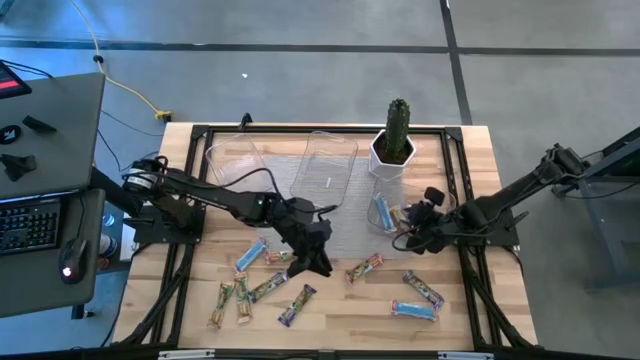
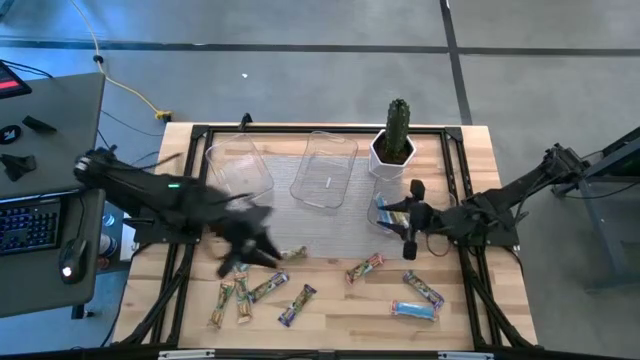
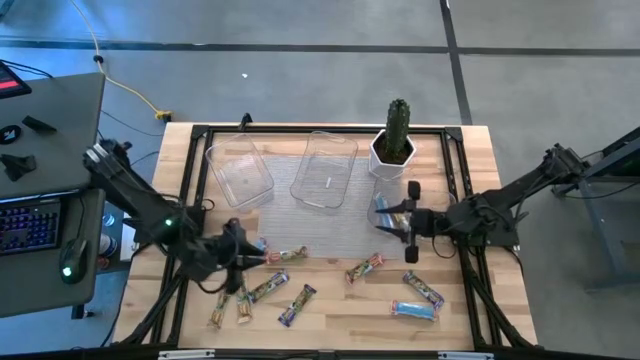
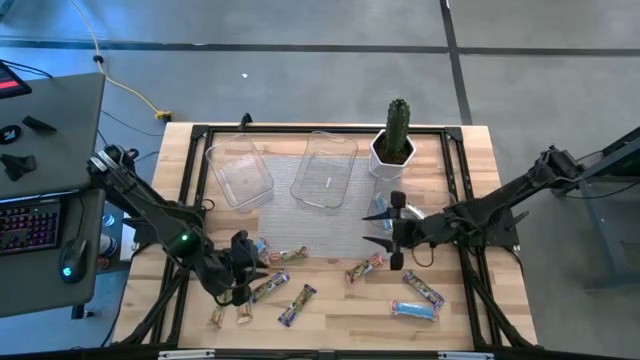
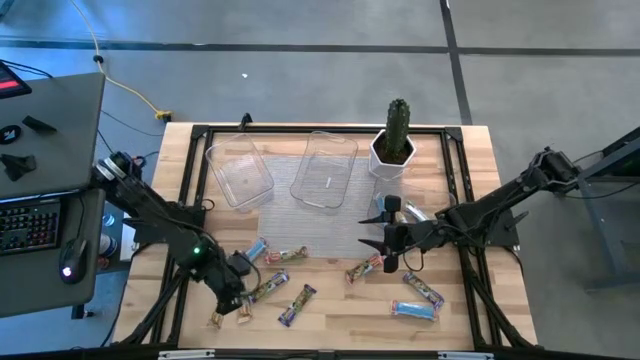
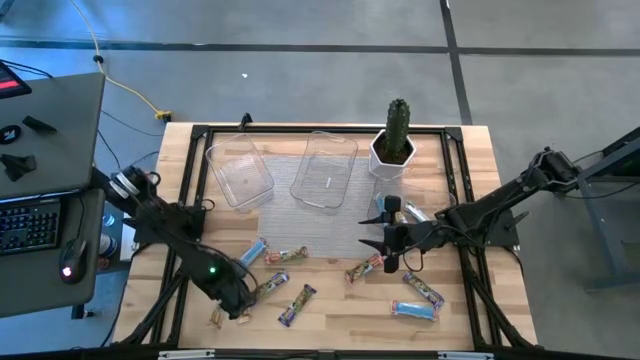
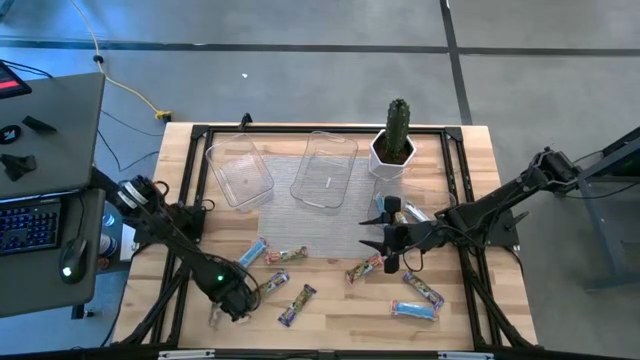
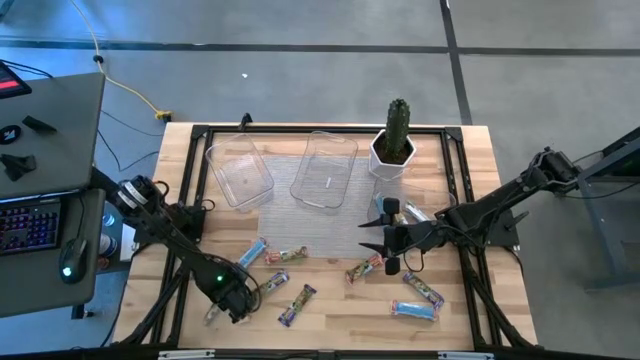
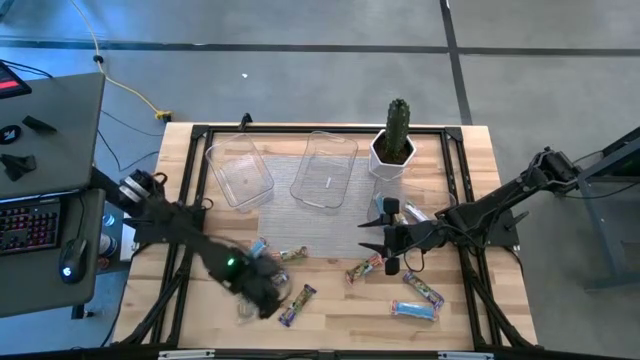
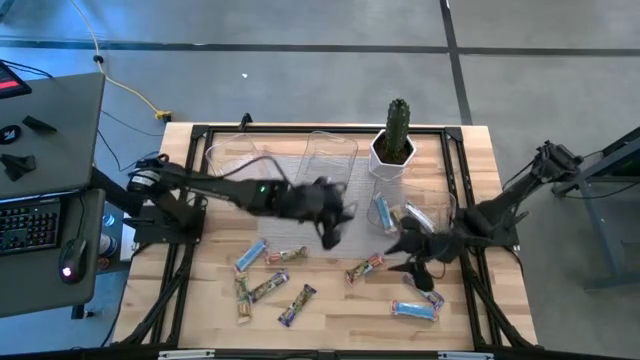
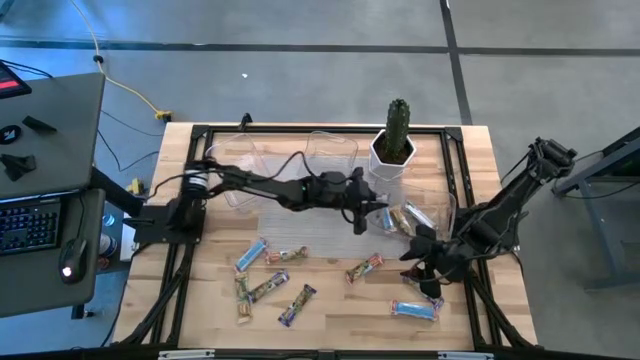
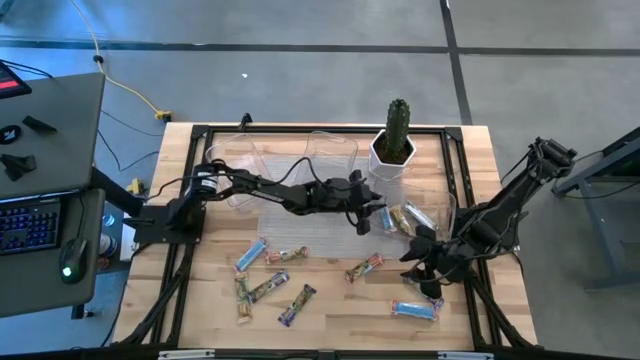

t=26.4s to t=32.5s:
Task: Pick and place Granola Bars by type
Put the yellow granola bar into the right transparent bin

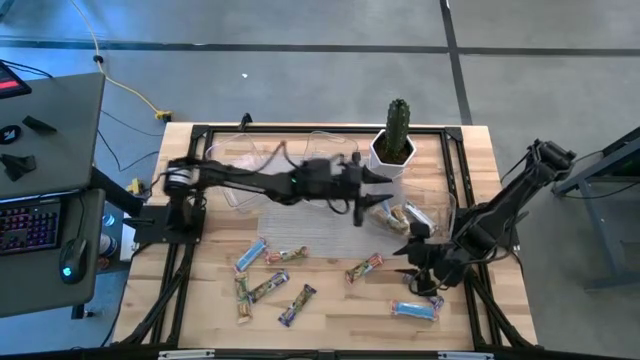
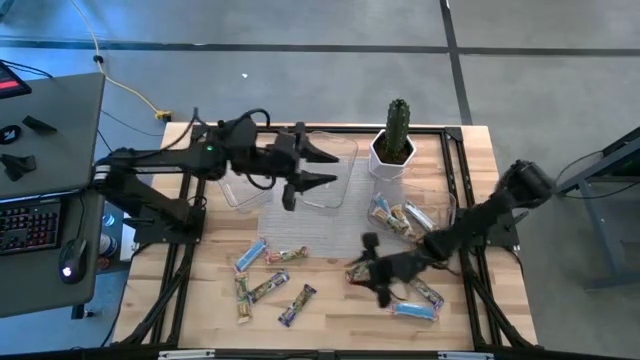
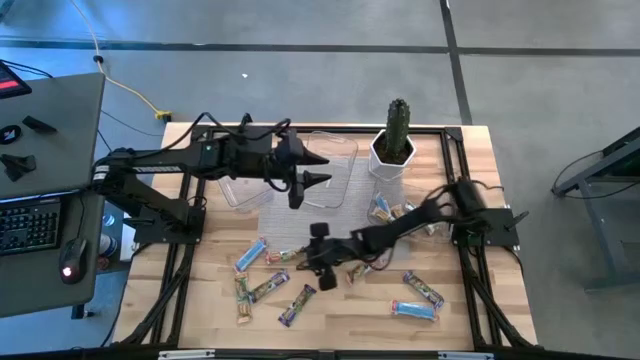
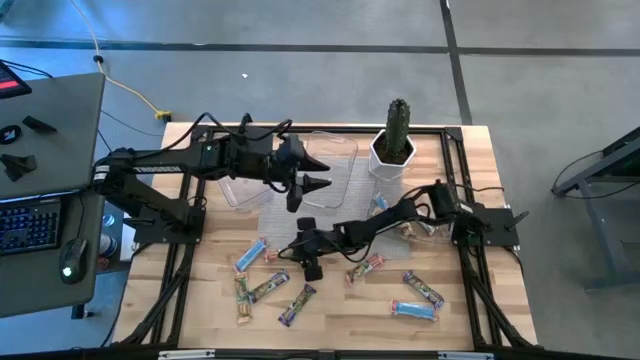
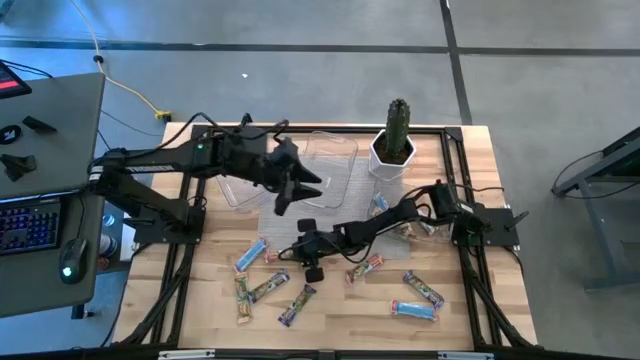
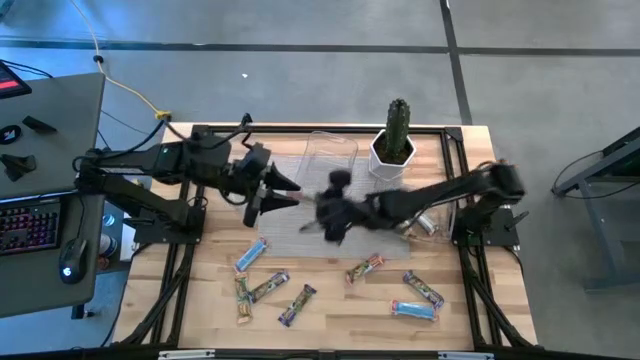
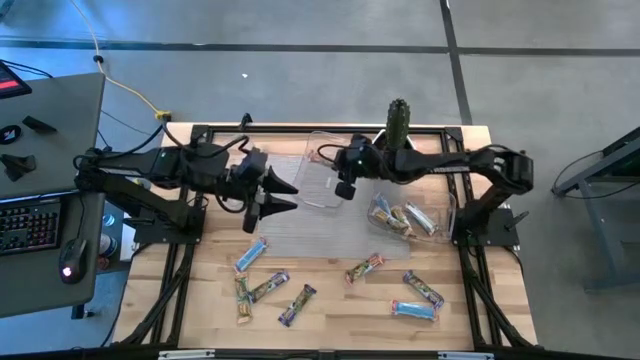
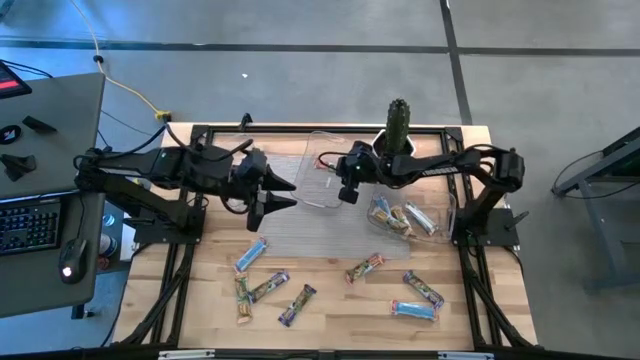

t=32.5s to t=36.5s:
Put the red granola bar into the middle transparent bin

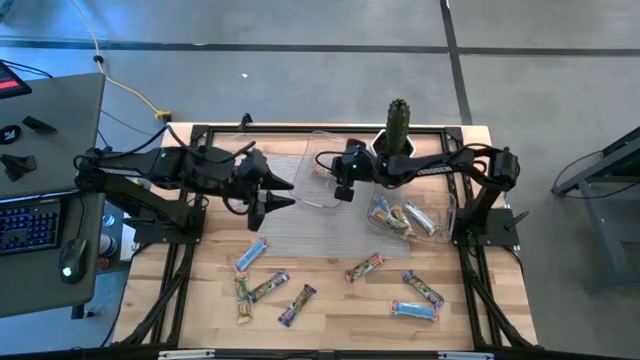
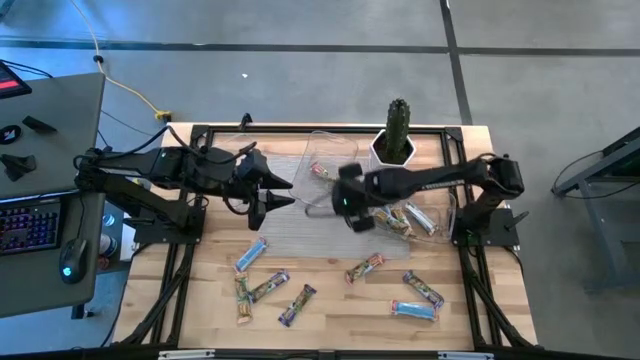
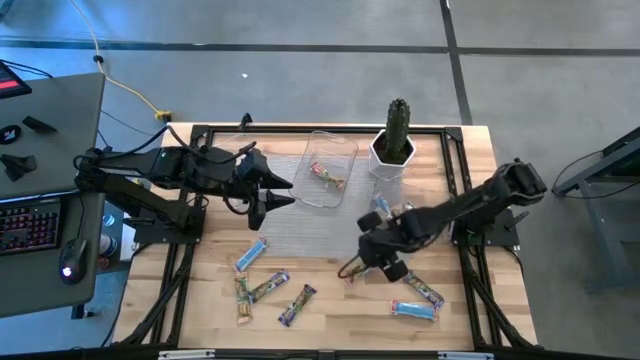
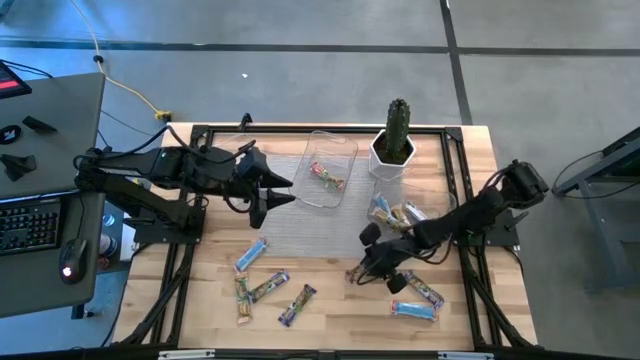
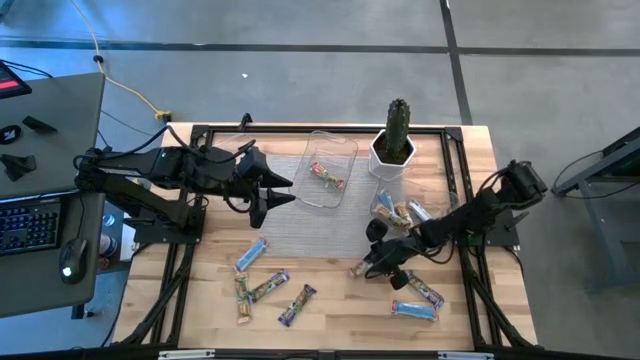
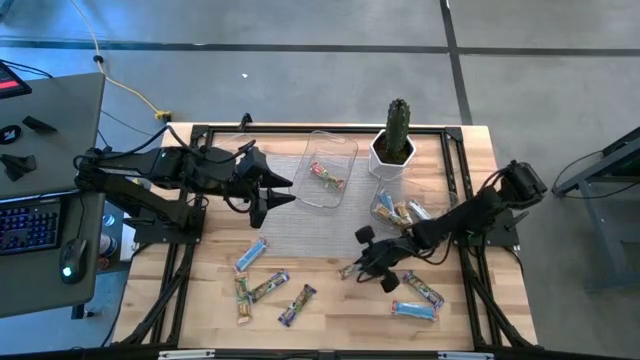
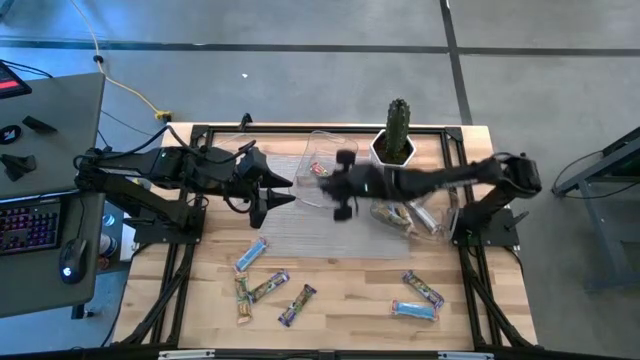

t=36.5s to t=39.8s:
Put the red granola bar into the middle transparent bin

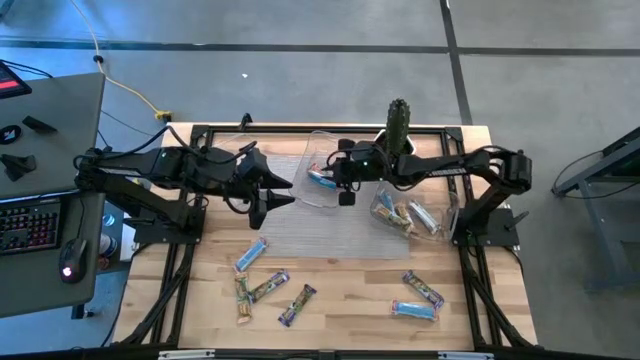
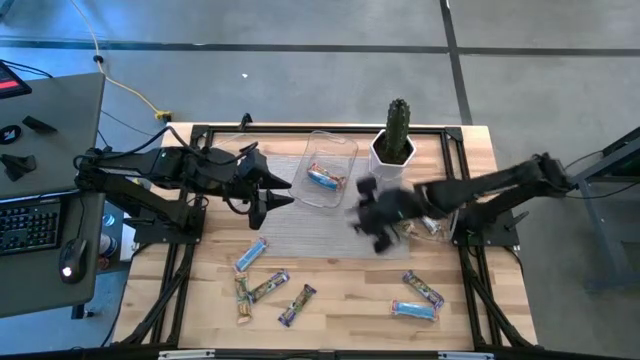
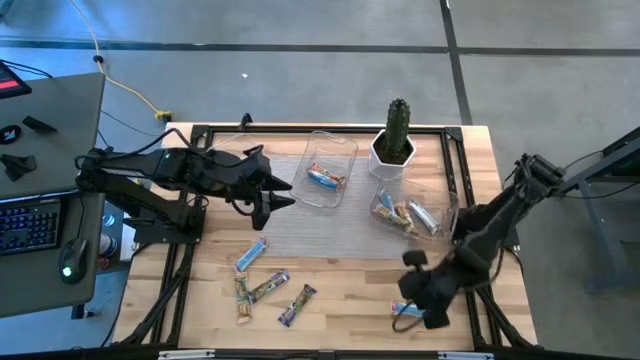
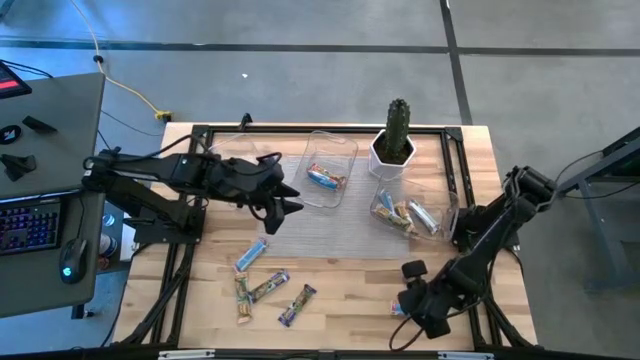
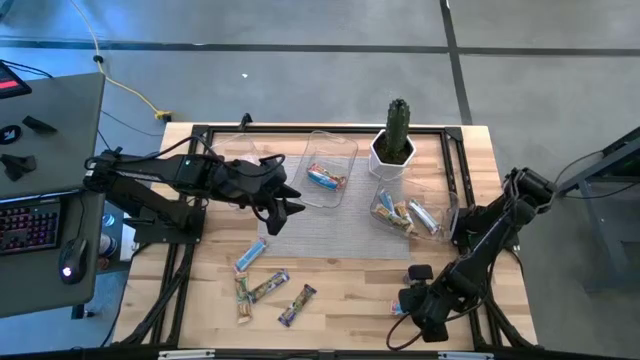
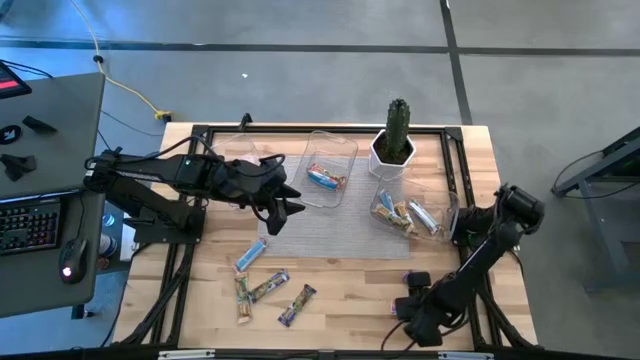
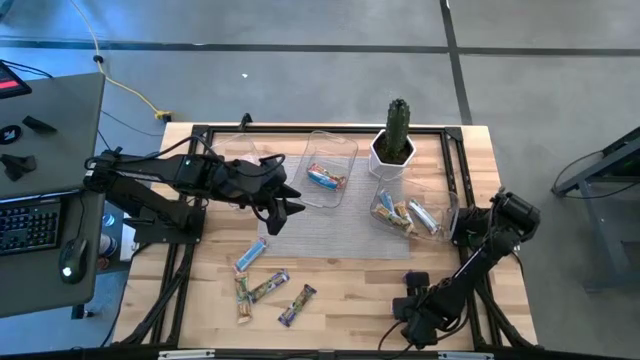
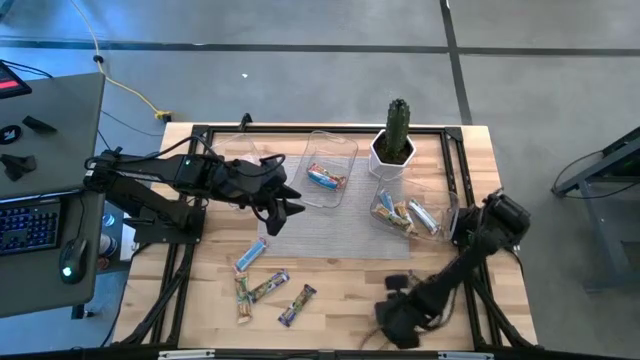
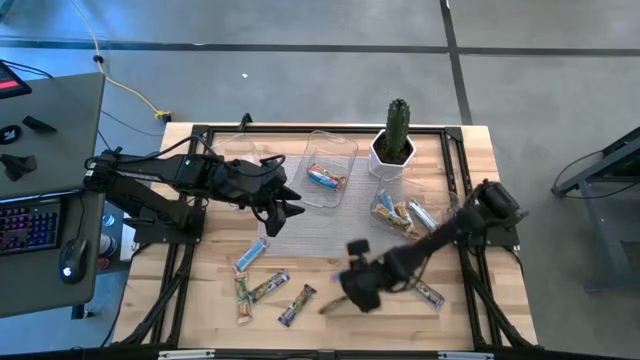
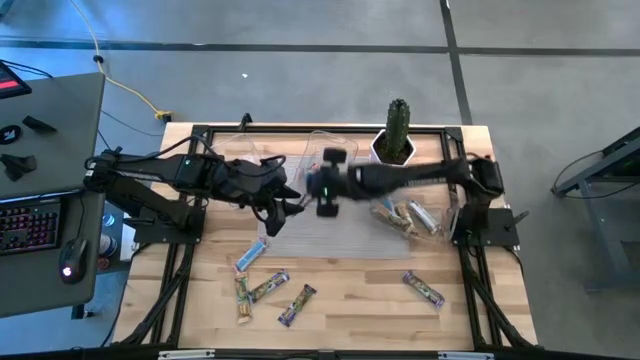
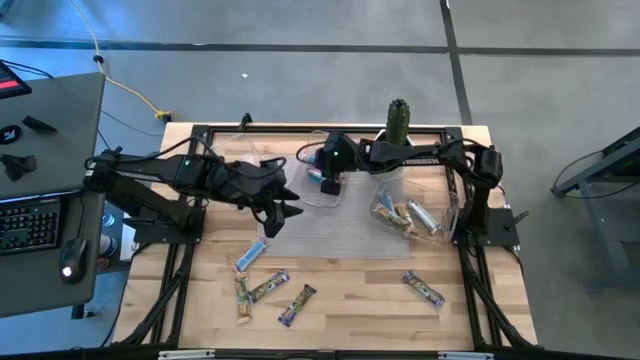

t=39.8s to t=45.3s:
Put the red granola bar into the middle transparent bin

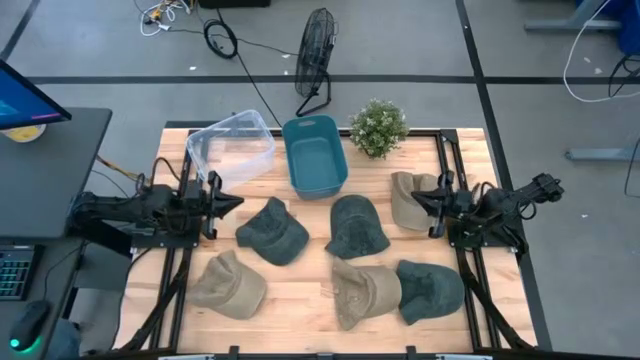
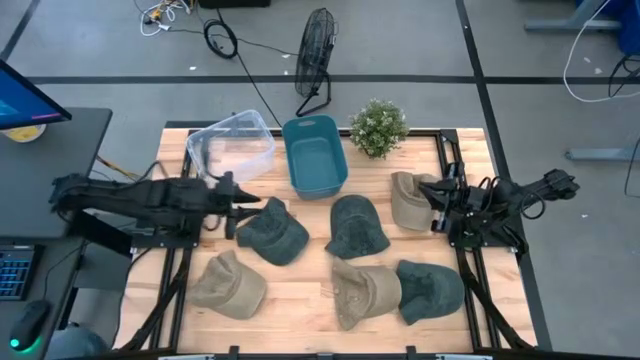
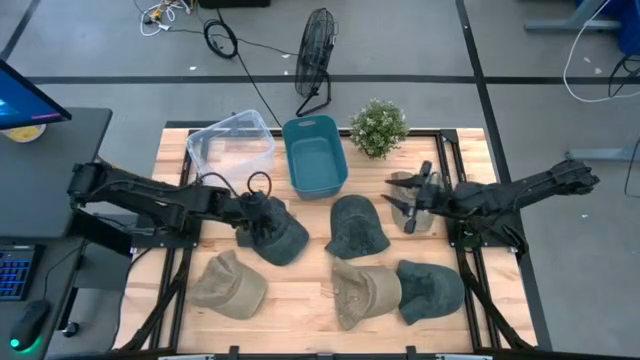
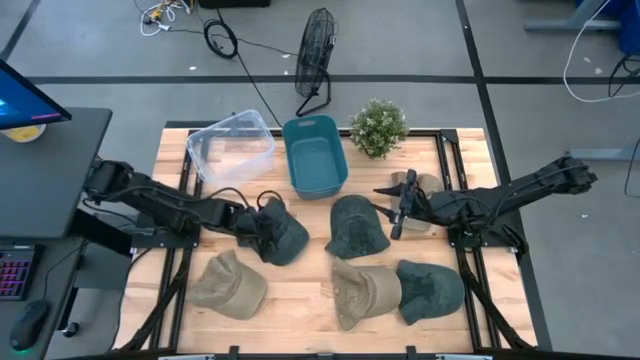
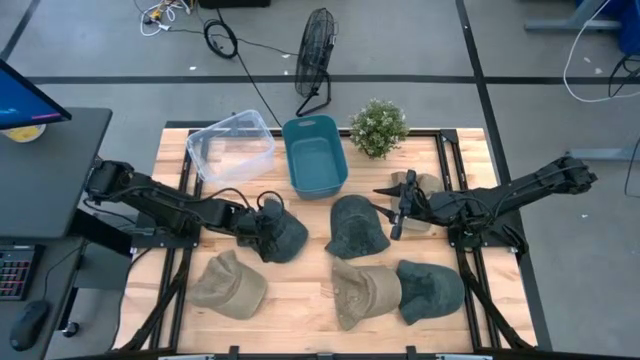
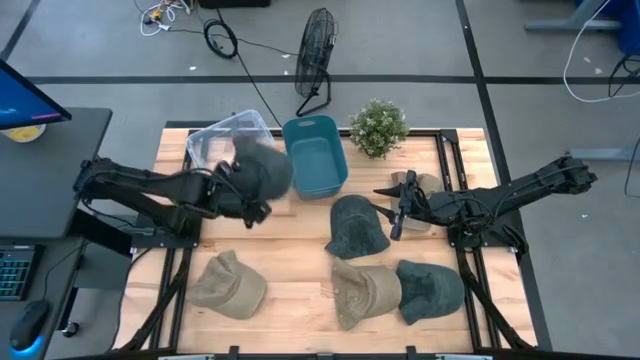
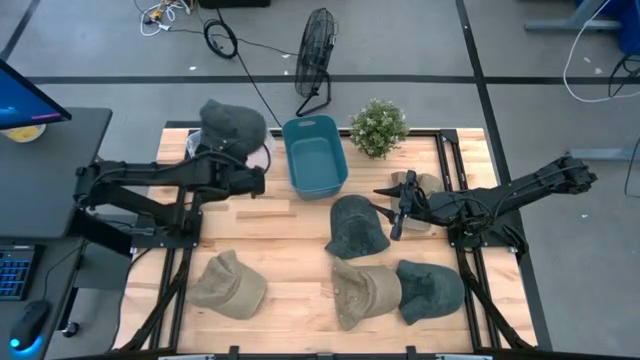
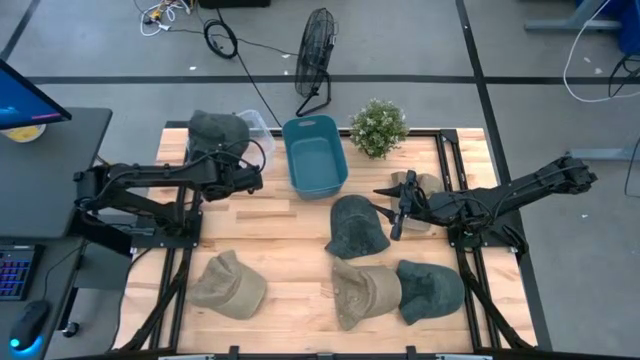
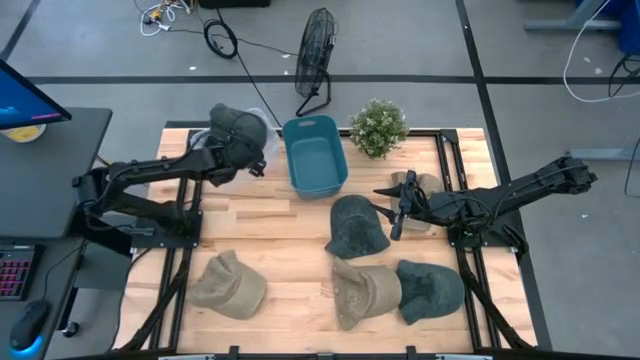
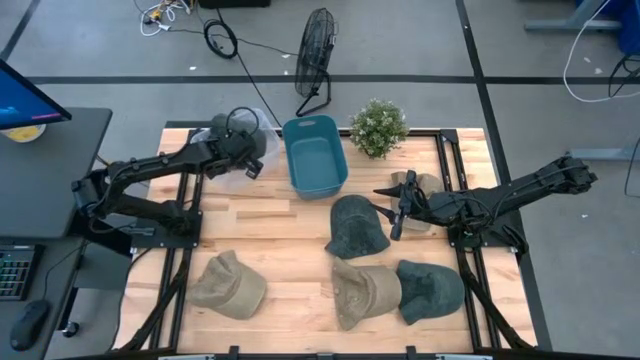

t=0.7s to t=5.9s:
Task: Pick & Place hat
Put the left blue cap into the transparent bin
